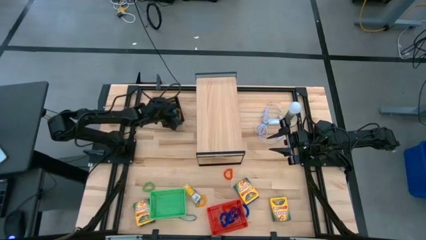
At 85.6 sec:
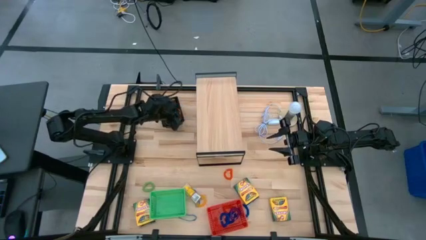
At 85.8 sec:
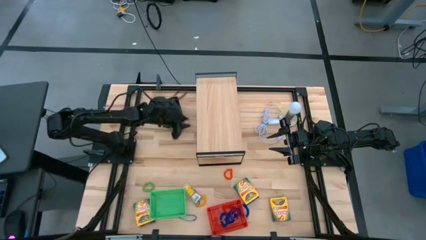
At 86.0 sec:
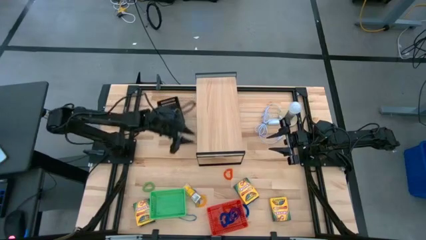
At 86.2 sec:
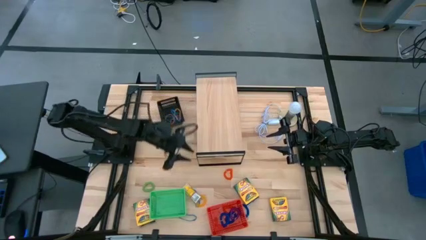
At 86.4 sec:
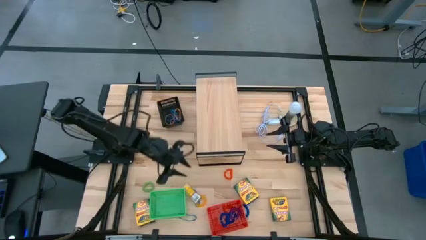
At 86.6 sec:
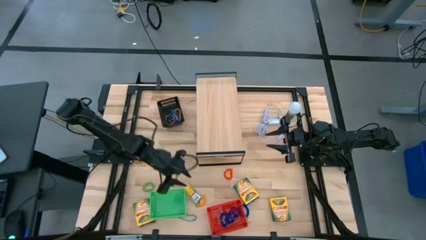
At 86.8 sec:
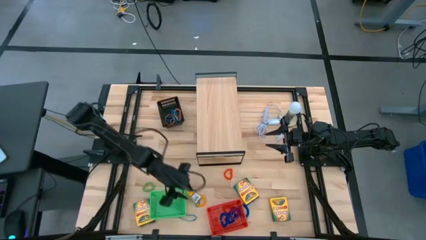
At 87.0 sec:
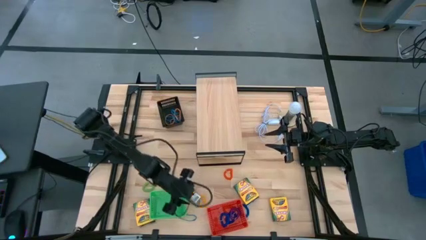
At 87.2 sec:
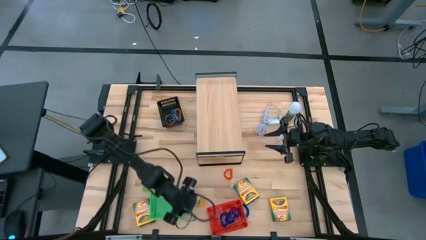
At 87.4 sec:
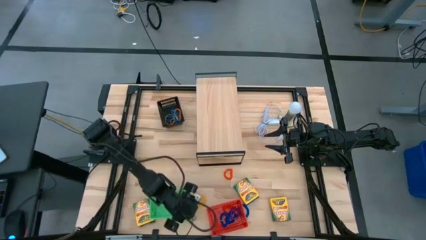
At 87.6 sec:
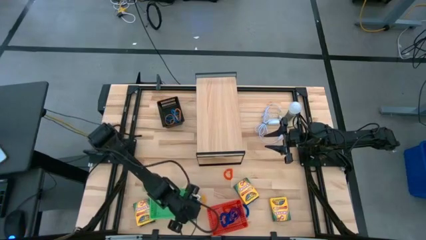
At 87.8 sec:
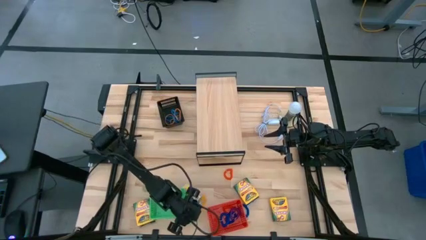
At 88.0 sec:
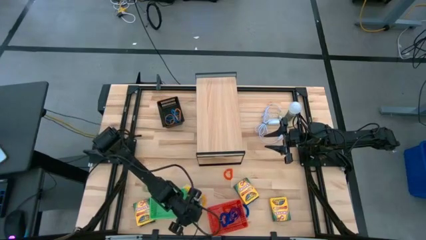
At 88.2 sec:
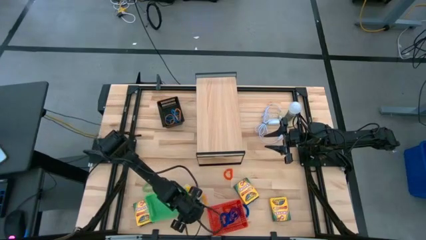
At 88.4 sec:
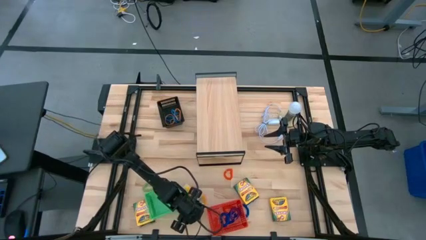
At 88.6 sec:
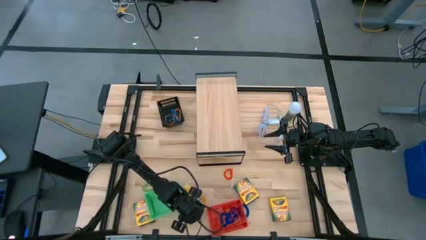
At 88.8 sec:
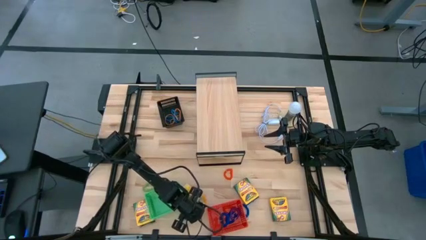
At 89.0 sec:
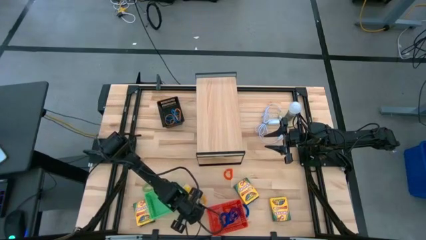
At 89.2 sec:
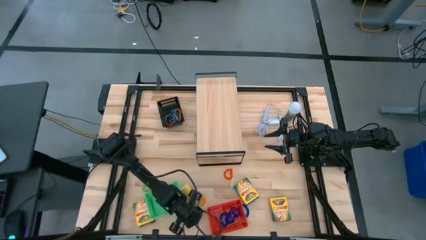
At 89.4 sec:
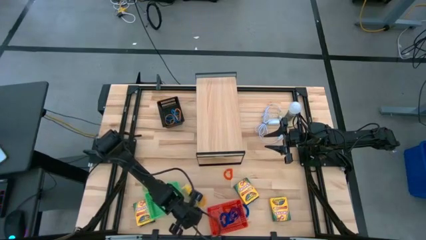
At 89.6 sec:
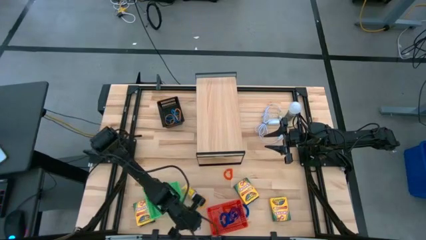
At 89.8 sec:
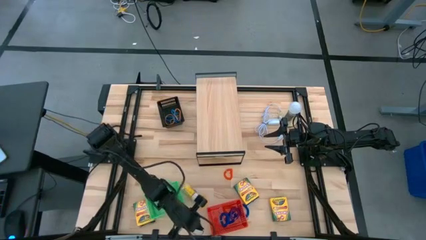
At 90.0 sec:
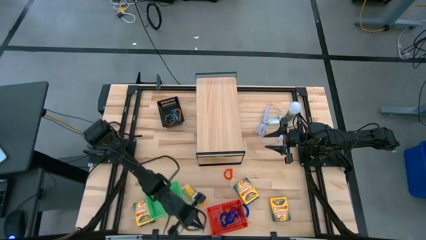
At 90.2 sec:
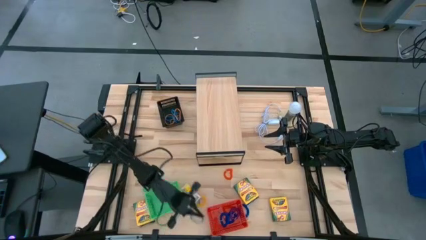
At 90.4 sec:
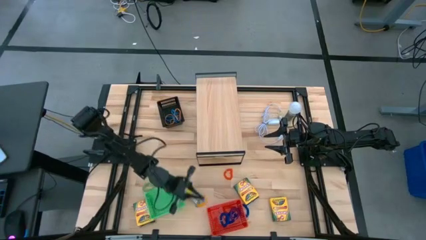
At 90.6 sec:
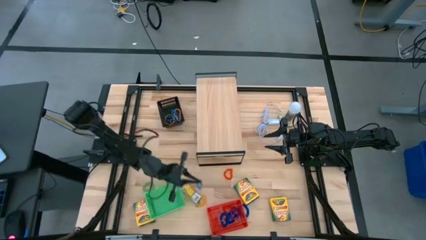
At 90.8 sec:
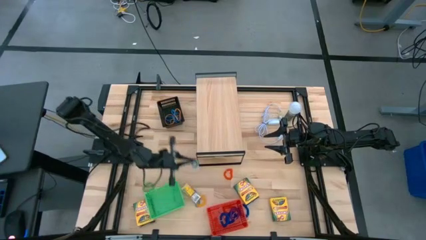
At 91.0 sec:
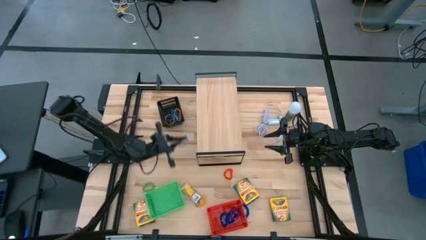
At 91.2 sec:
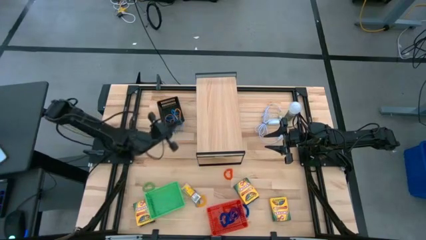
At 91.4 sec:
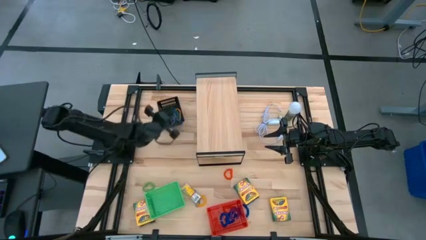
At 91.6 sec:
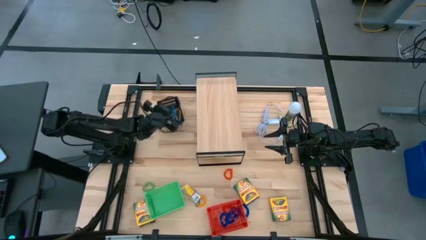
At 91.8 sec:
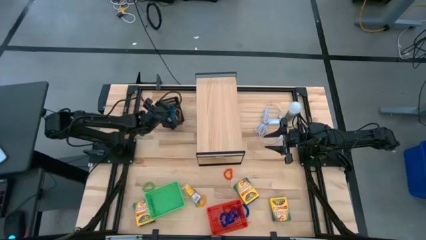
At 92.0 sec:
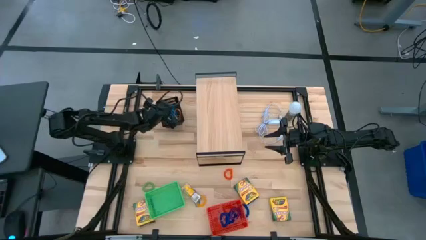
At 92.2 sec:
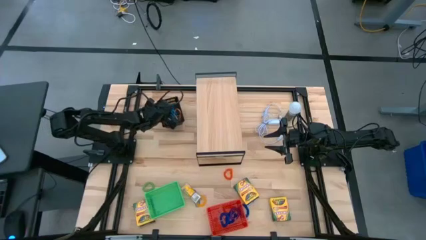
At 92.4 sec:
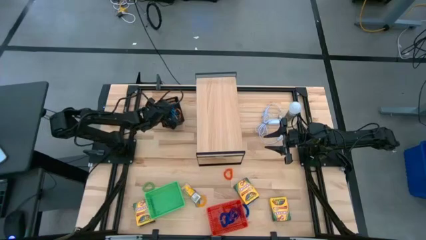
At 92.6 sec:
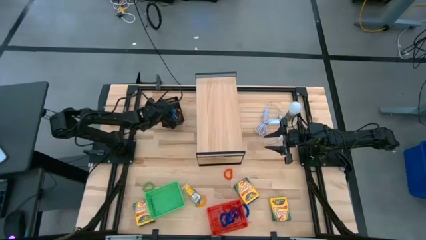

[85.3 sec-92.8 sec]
Task: Pick & Place Office Desk Supplies
Put the blue rubber band into the black basket

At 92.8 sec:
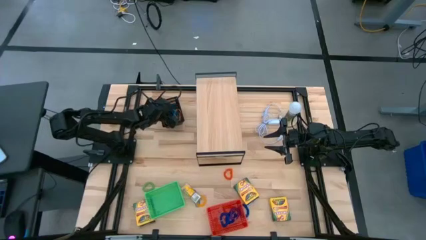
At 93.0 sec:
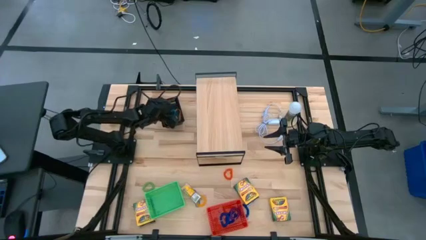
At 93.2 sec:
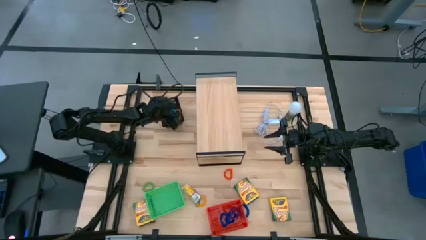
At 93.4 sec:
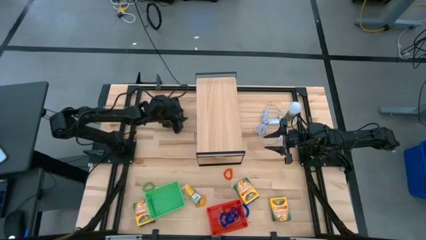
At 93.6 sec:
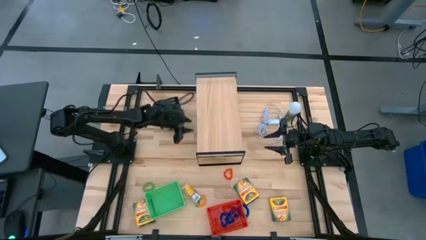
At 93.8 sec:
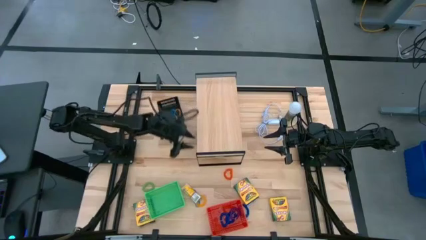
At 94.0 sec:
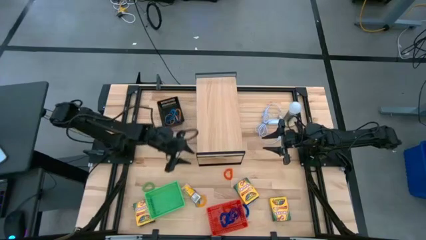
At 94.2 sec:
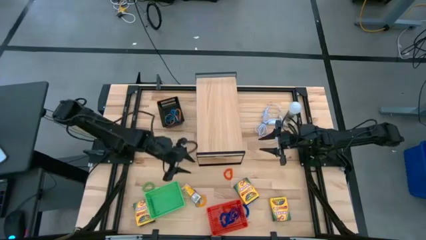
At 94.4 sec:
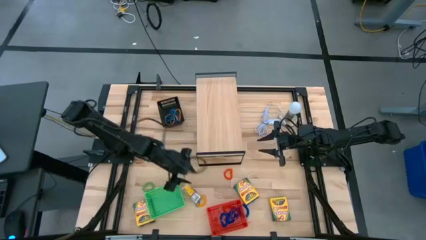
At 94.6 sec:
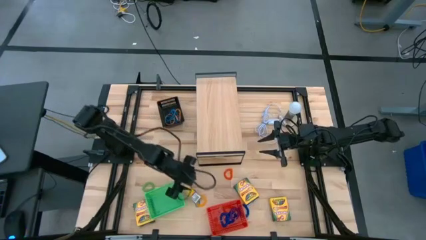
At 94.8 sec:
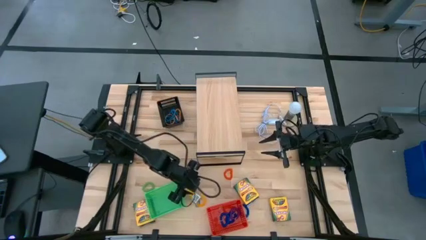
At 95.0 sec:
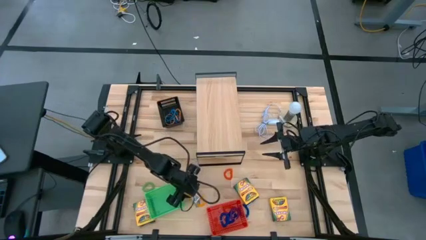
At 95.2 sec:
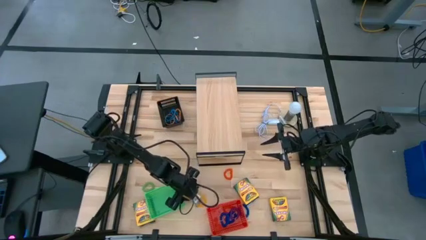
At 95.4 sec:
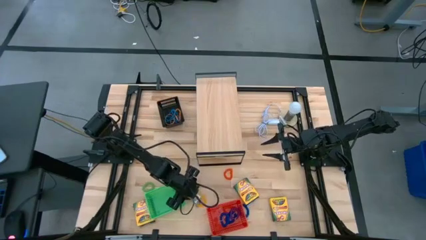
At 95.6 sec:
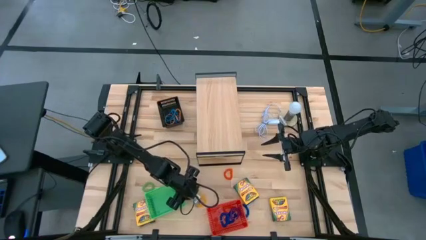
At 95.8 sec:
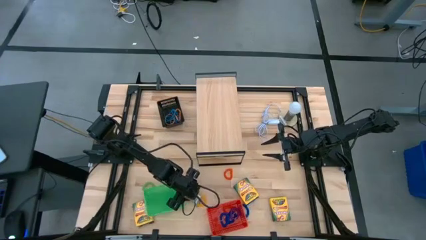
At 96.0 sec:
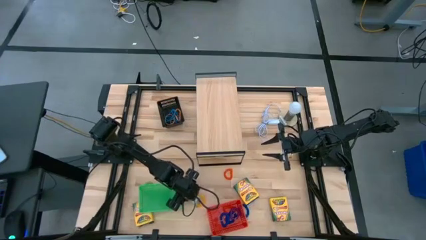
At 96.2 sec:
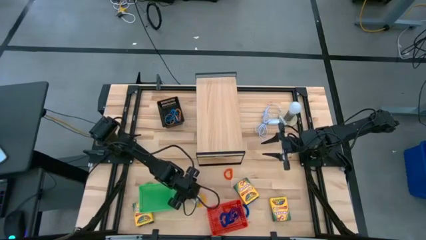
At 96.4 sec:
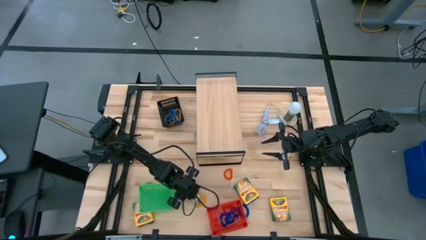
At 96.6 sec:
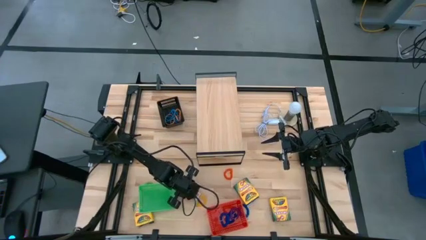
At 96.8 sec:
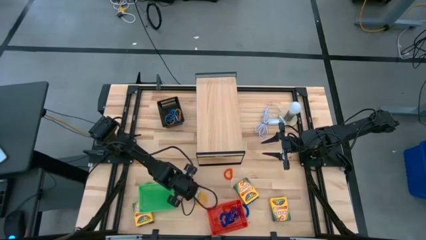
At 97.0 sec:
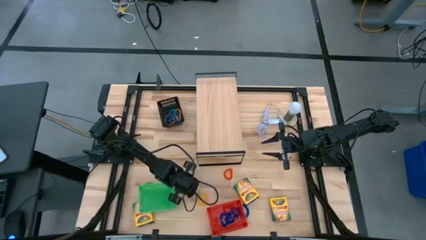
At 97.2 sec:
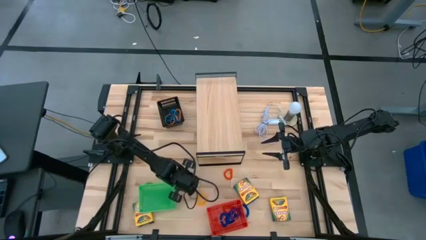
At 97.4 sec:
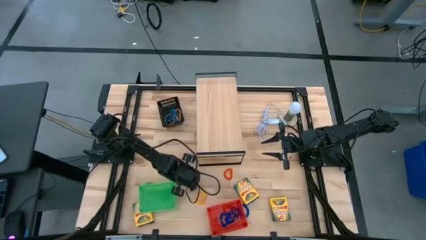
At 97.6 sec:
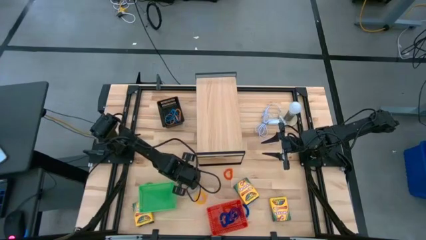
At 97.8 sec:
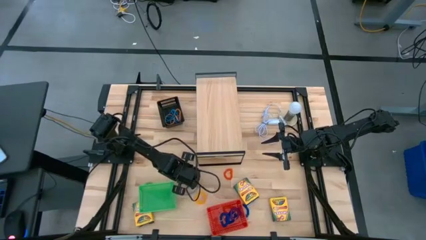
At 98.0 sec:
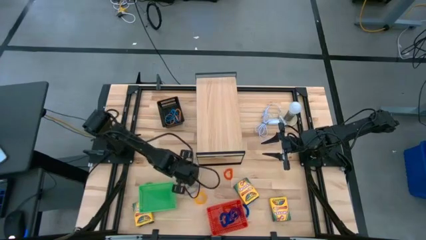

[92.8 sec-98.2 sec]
Adjust the small crayon box on the table

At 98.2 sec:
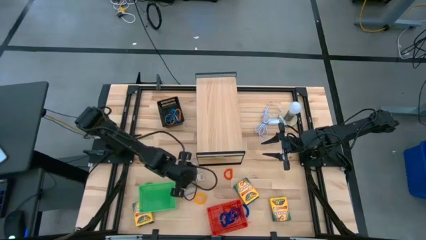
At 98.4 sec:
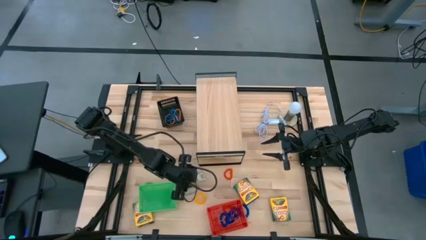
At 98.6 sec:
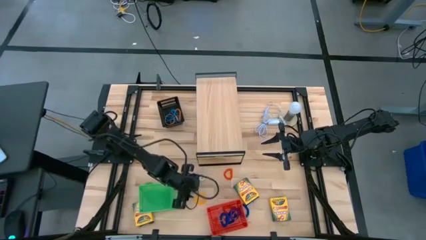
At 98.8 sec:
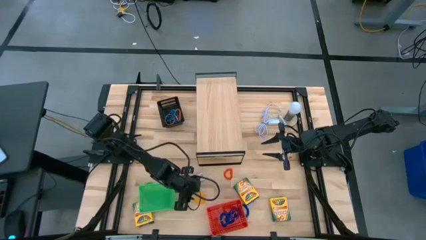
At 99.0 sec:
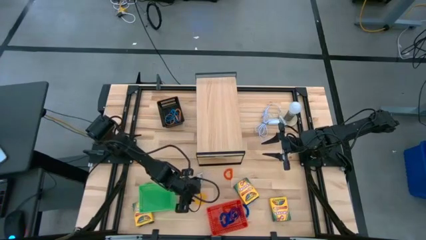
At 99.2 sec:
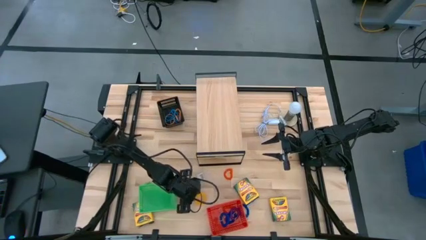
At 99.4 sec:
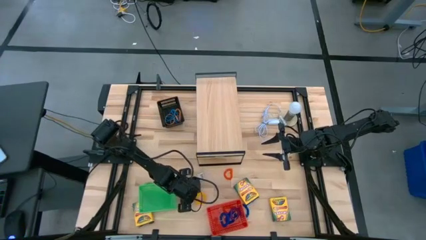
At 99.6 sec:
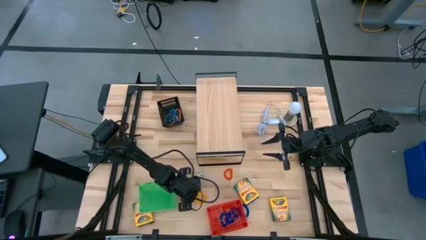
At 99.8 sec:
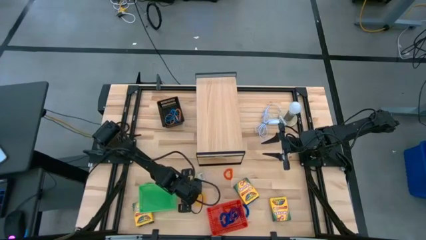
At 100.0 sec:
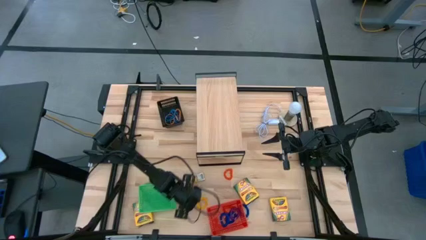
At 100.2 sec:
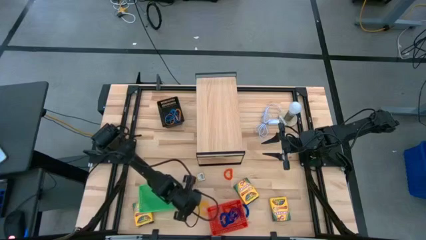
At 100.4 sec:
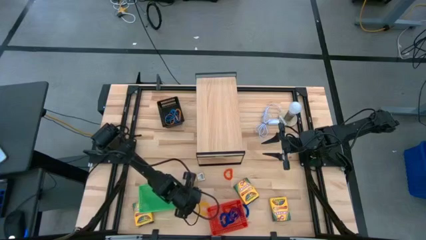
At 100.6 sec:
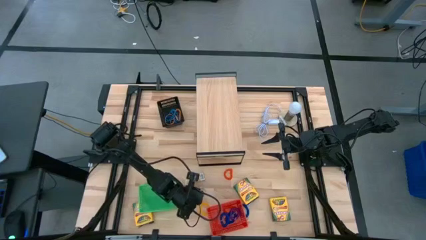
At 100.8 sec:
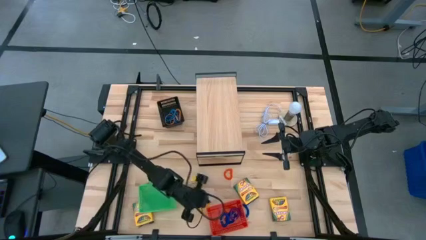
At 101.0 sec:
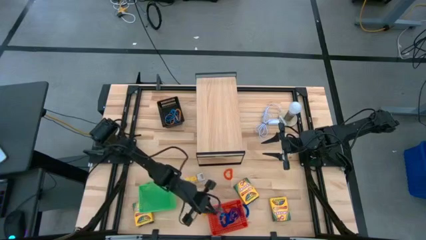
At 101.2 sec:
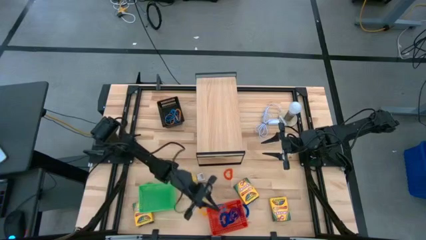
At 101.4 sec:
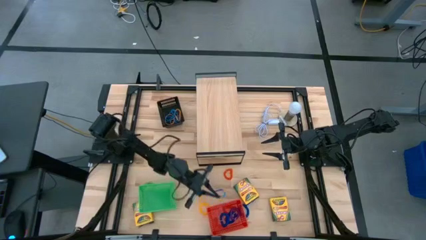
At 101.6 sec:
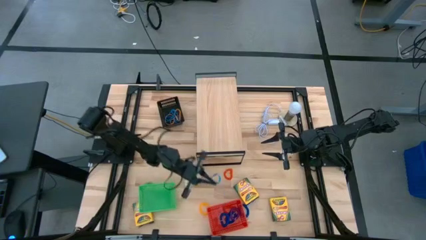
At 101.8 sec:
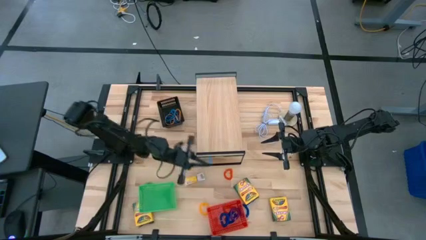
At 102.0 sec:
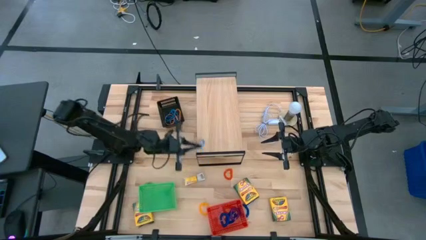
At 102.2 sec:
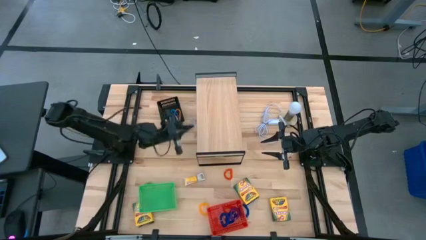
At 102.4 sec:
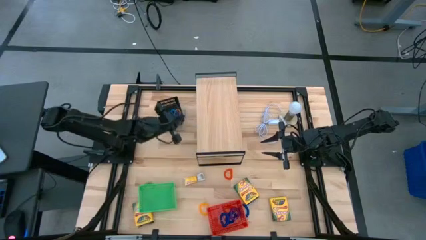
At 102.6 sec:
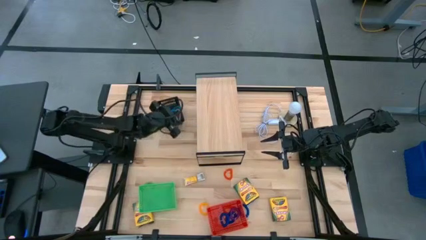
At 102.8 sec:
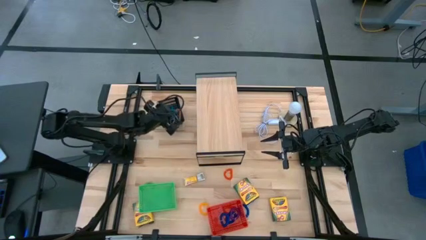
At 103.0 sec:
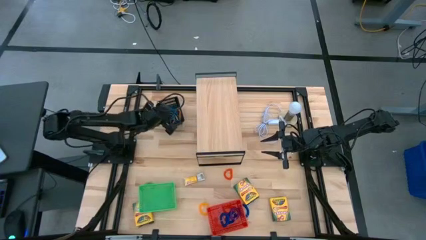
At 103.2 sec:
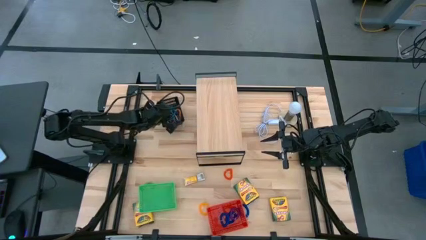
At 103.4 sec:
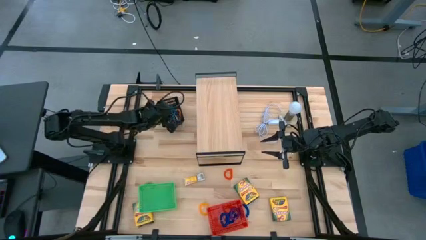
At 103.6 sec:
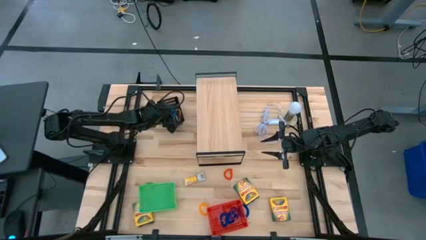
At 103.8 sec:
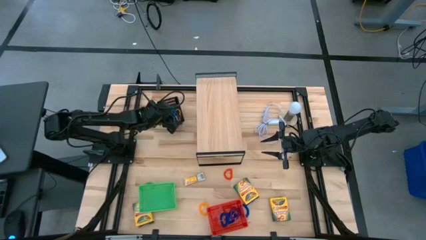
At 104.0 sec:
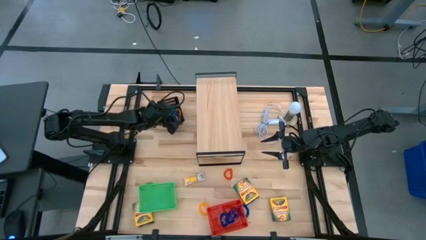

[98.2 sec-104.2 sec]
Put the blue rubber band into the black basket
